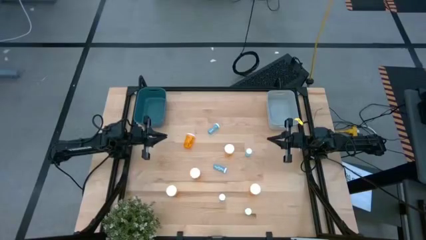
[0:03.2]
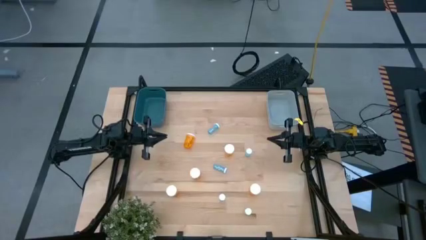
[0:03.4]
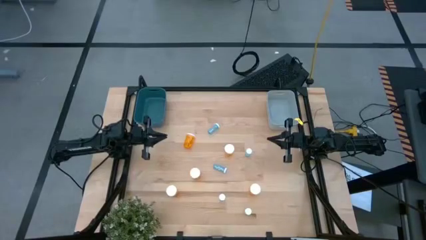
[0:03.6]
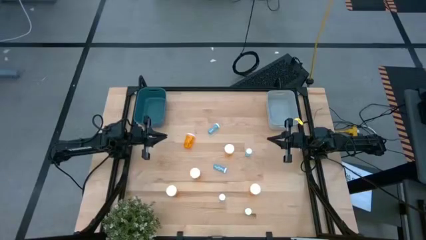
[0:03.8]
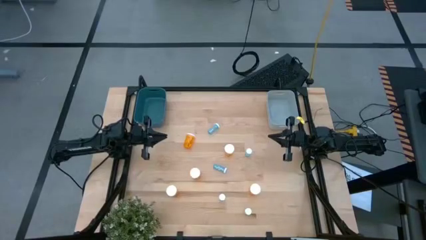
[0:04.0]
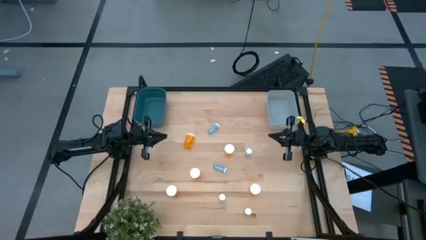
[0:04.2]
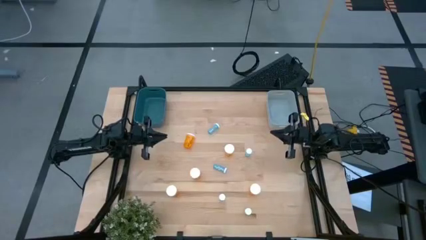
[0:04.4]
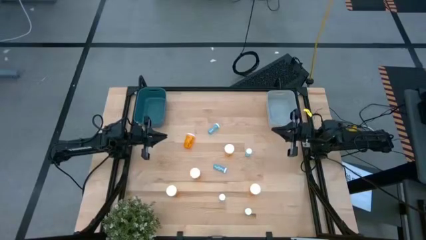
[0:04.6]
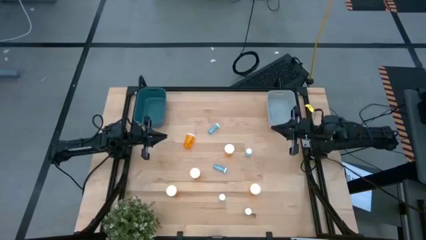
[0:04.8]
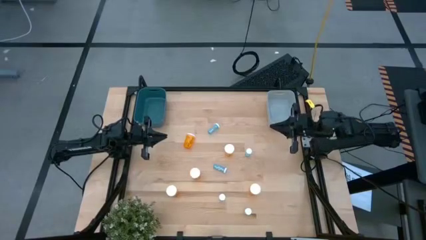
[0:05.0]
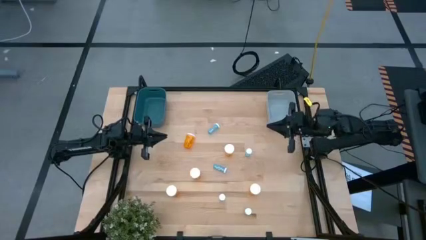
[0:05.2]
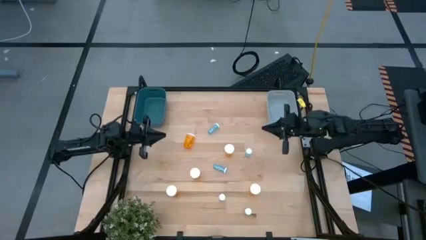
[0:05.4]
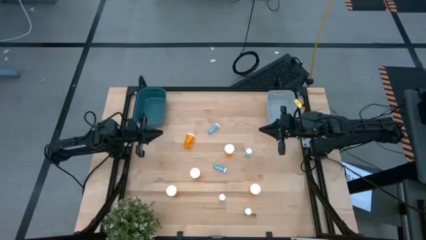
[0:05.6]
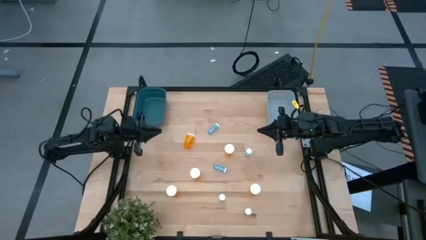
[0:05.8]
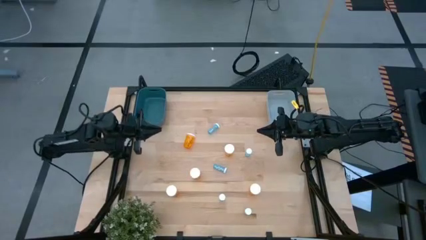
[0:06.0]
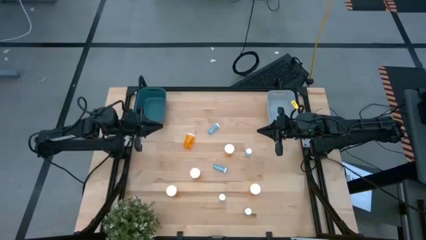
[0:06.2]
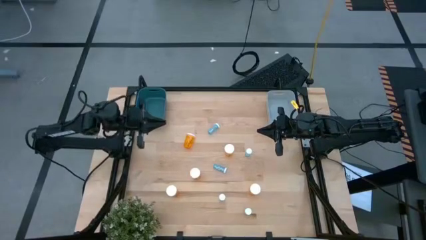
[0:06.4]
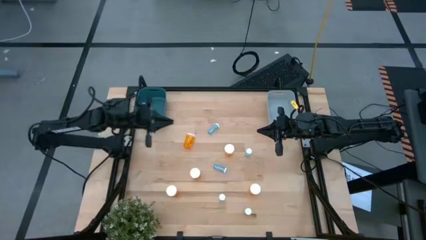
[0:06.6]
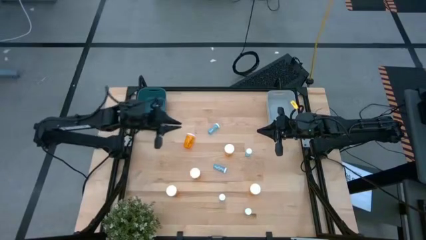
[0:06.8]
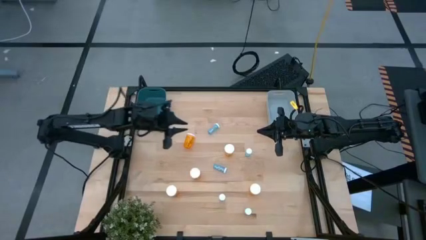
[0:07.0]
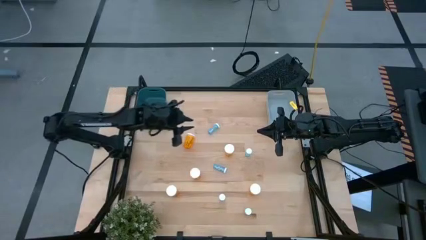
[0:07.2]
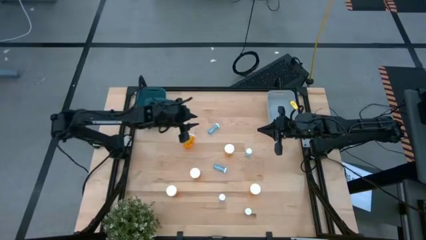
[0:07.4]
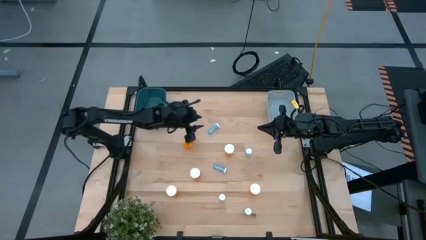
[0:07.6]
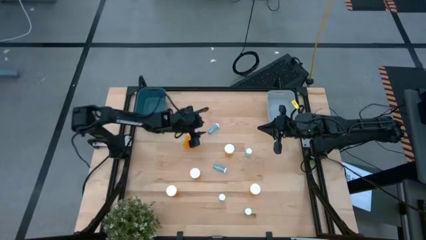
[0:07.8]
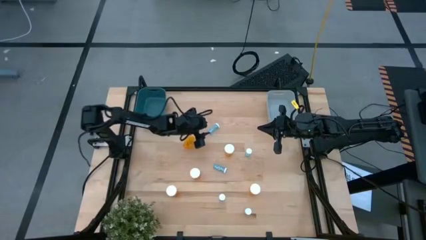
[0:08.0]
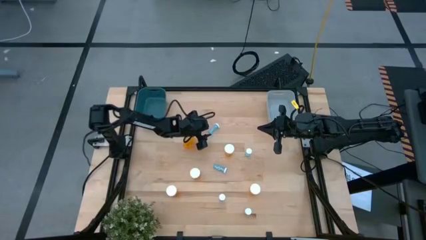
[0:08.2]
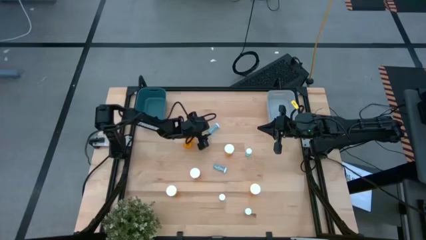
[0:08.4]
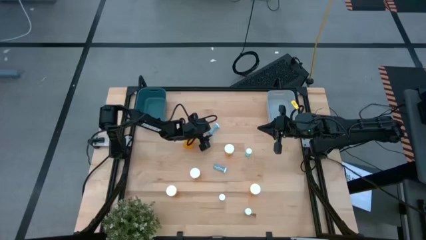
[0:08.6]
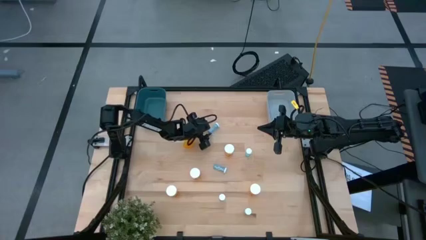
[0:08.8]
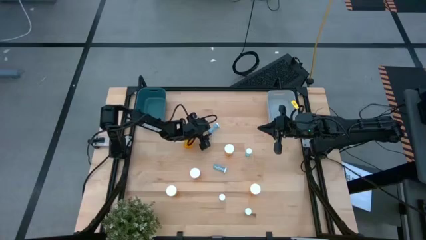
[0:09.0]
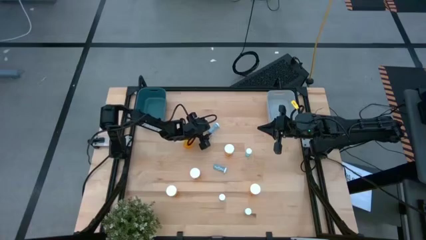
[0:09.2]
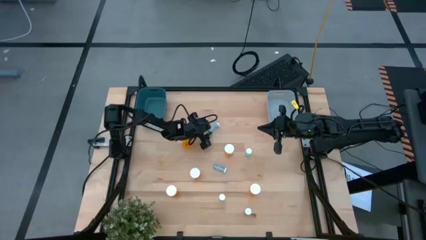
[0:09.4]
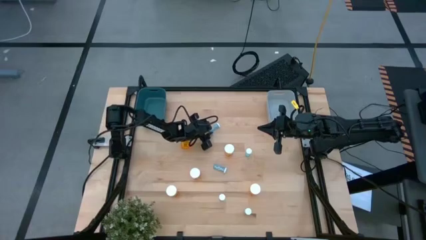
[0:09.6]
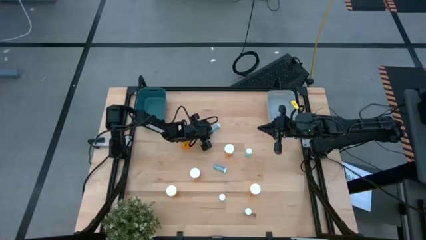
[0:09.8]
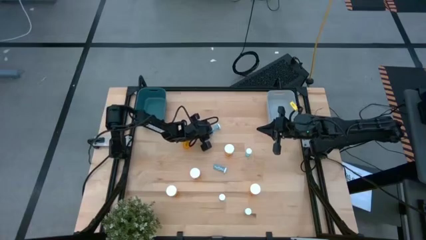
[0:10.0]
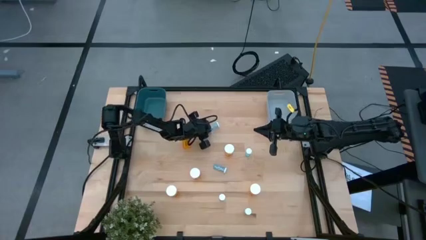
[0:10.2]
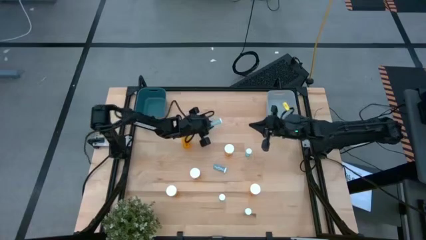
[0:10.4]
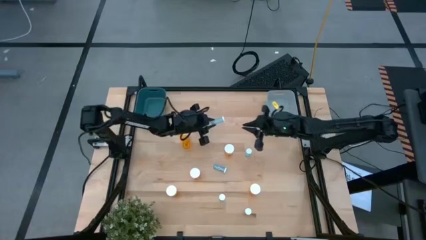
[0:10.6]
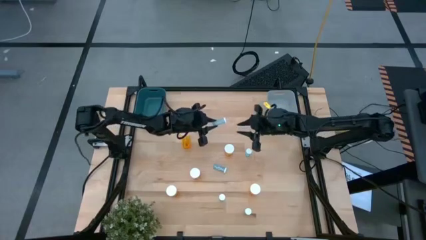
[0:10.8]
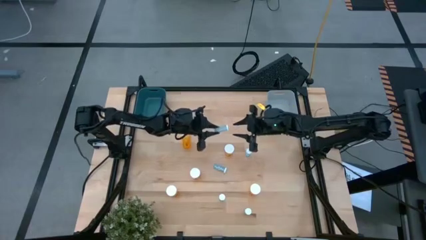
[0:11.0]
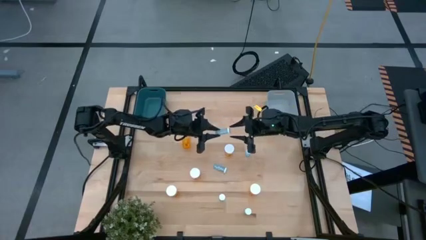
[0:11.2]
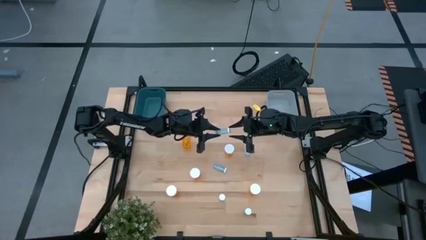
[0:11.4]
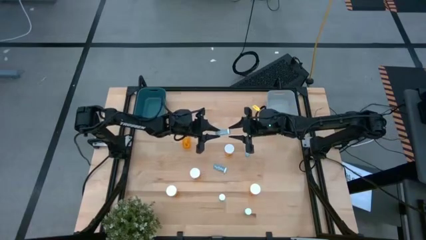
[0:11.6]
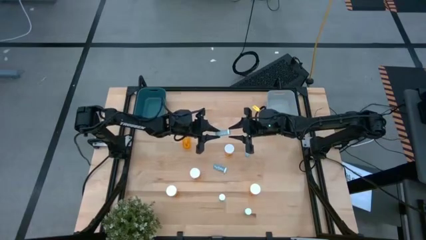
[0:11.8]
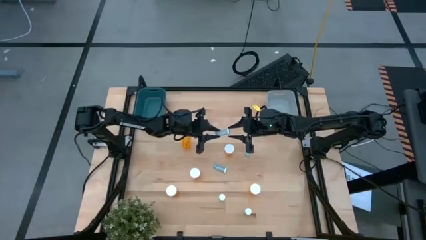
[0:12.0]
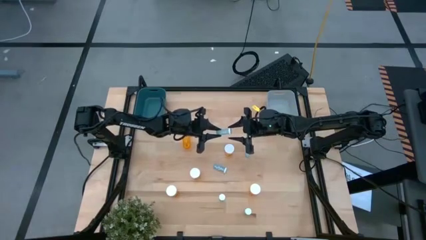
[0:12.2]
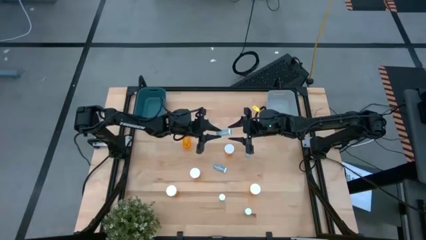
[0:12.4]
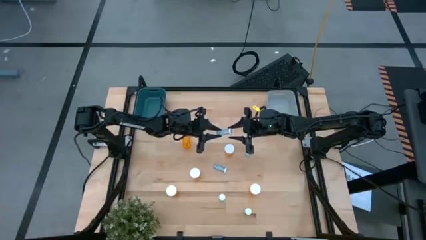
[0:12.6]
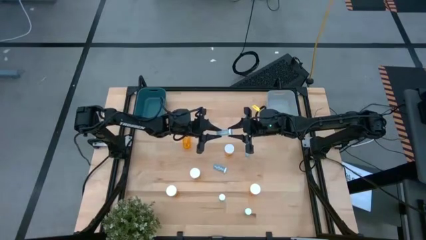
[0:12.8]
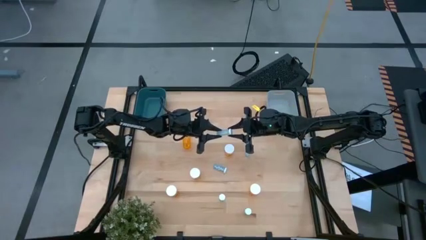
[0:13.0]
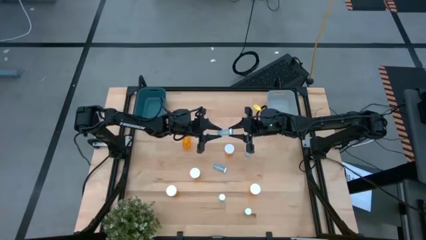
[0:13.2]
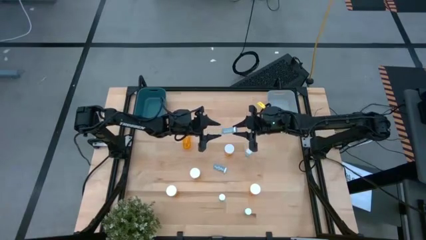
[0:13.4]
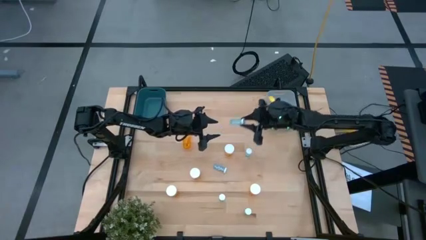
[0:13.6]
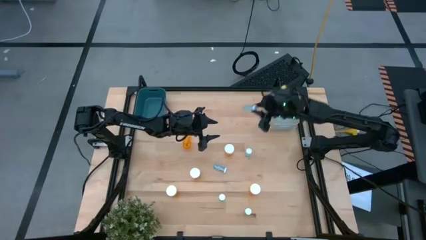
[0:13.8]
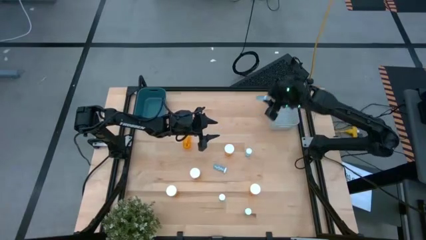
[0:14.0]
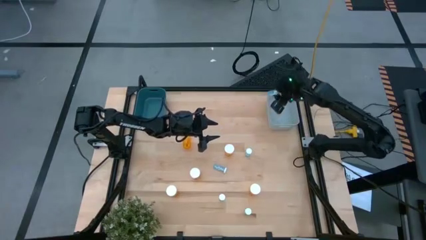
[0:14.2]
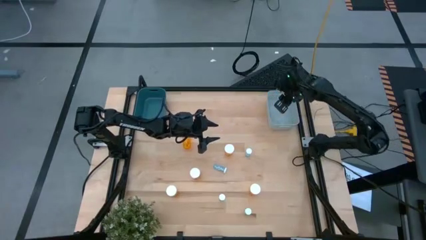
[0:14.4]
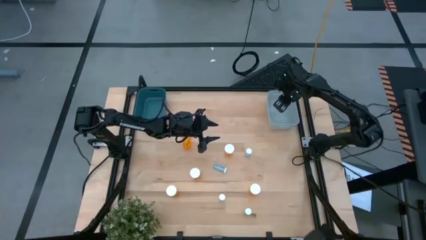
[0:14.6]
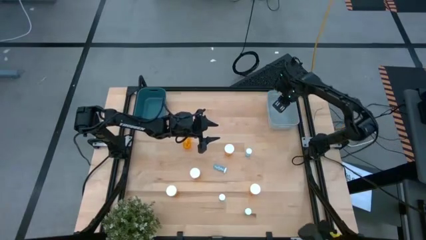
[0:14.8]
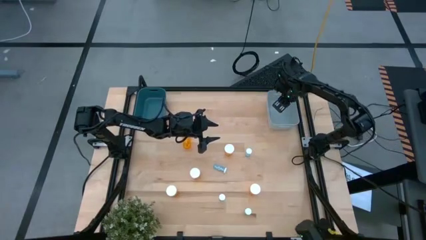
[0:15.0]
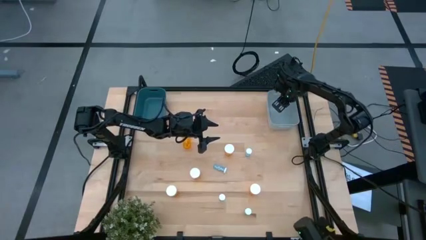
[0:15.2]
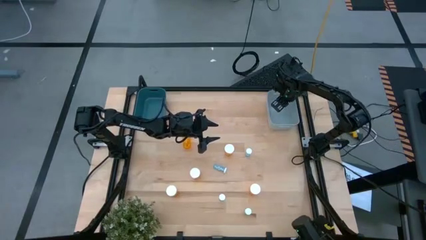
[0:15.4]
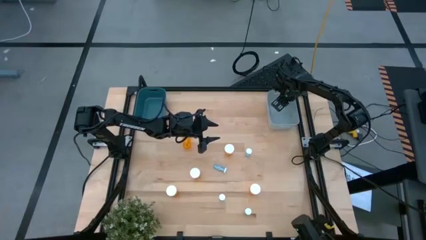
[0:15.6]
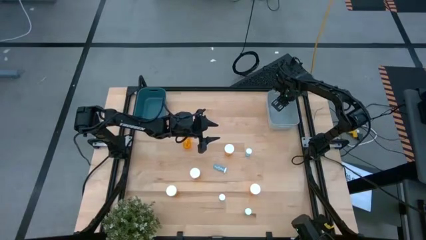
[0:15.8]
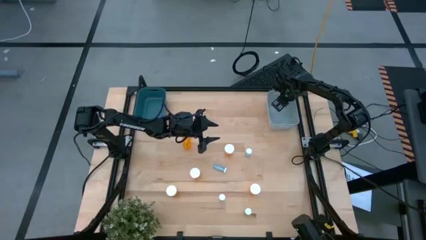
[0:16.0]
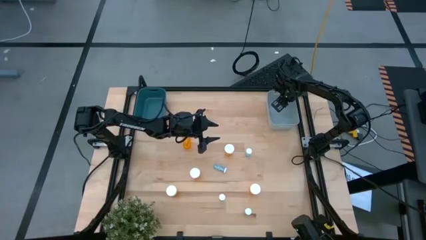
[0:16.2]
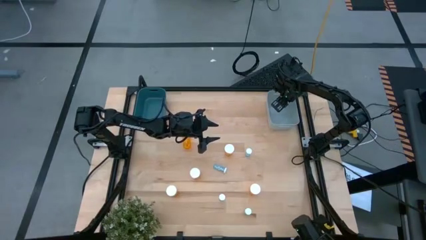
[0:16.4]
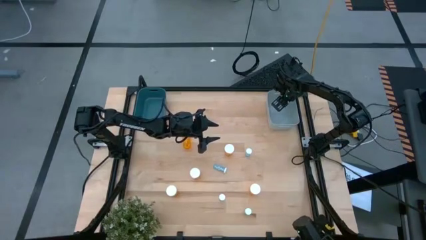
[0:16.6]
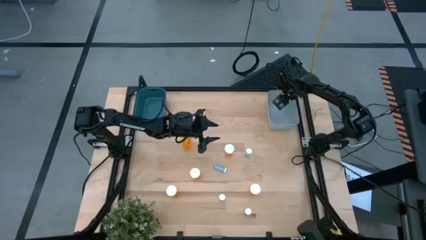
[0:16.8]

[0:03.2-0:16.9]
Task: Pick and place medicine bottles into bin by pill shape (circle, oval)
Put the blue tablet bottle into the gray bin
